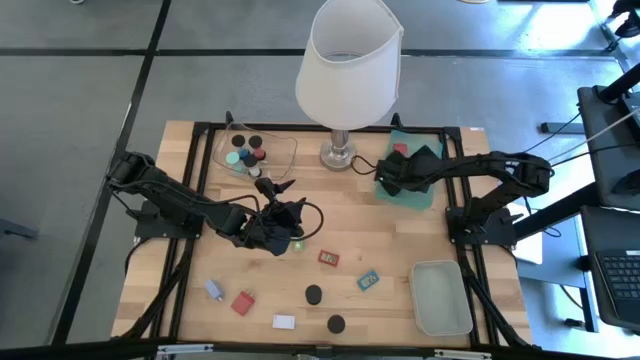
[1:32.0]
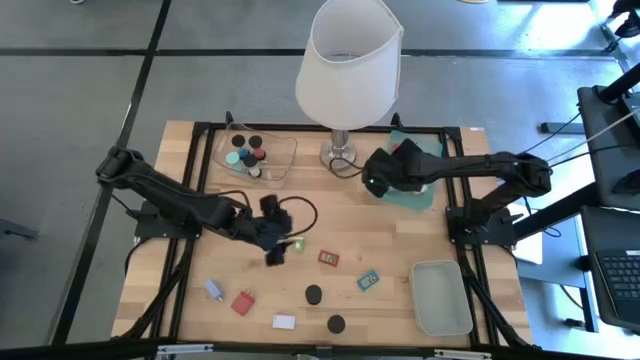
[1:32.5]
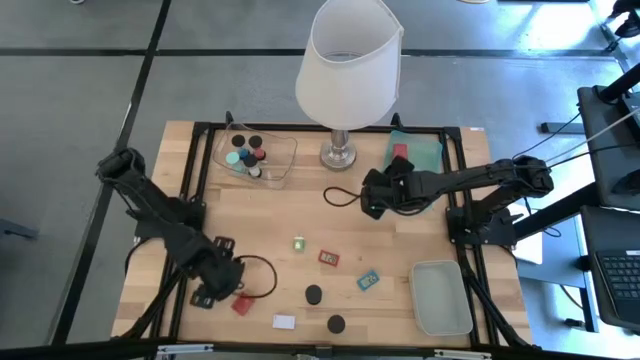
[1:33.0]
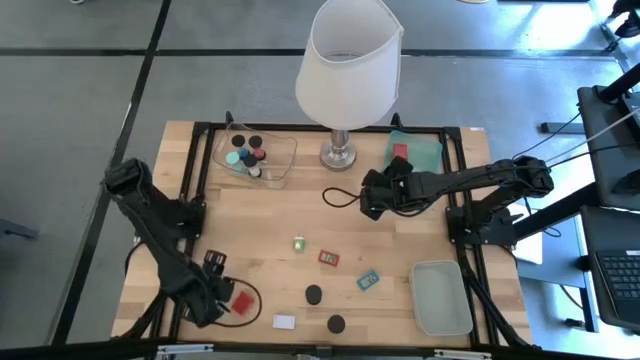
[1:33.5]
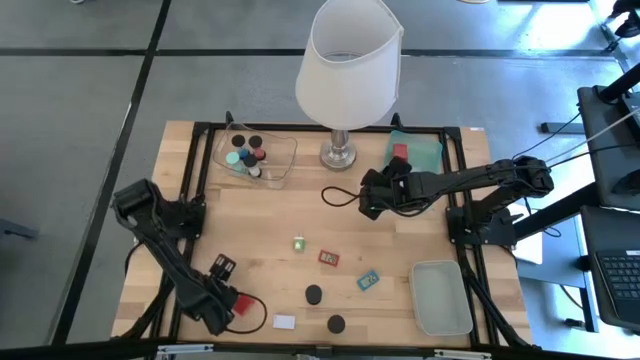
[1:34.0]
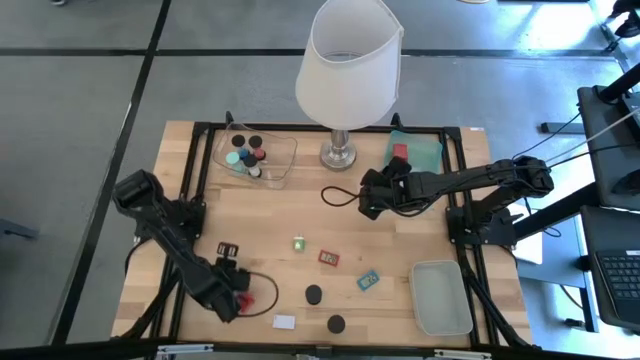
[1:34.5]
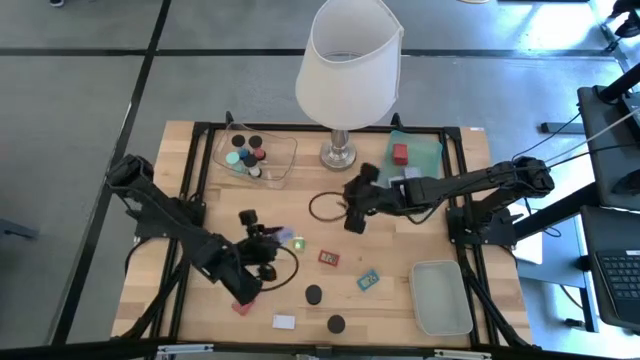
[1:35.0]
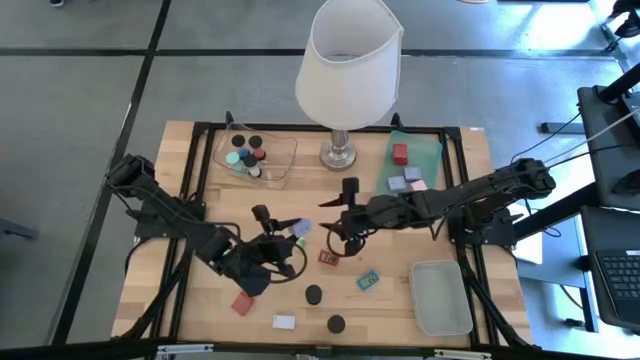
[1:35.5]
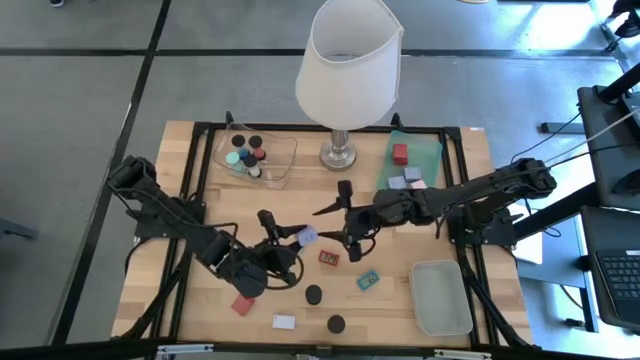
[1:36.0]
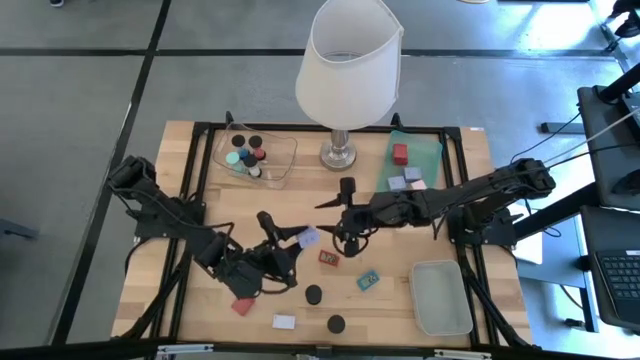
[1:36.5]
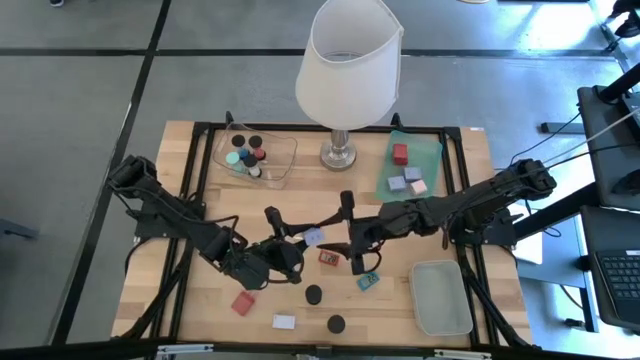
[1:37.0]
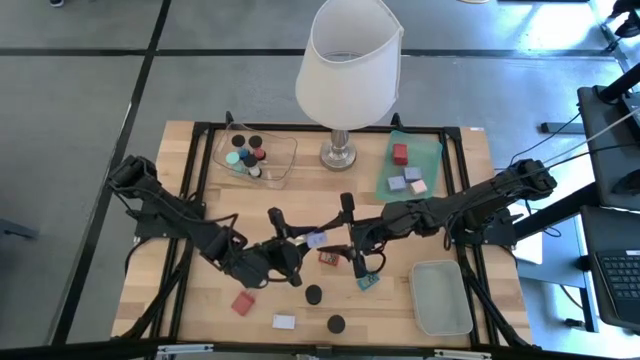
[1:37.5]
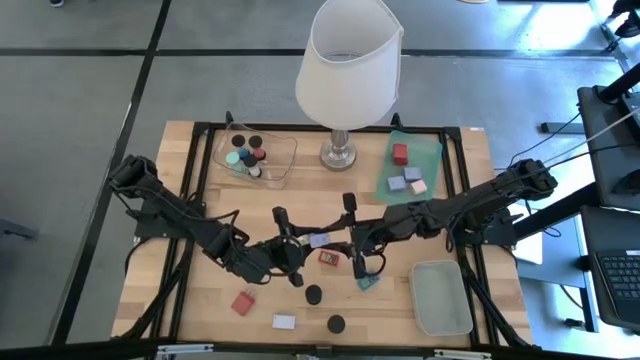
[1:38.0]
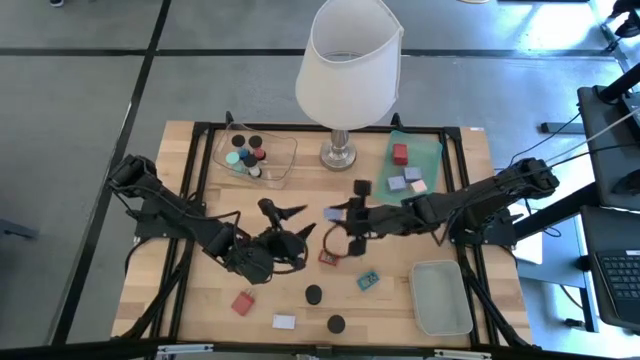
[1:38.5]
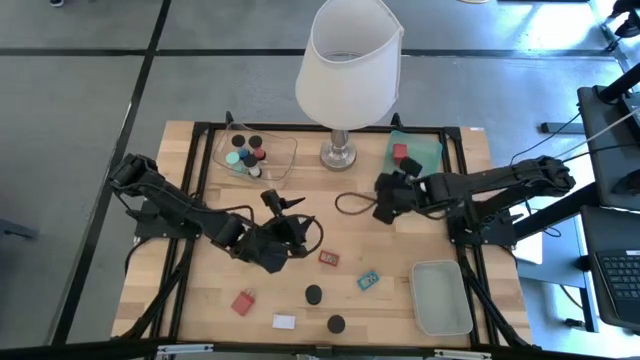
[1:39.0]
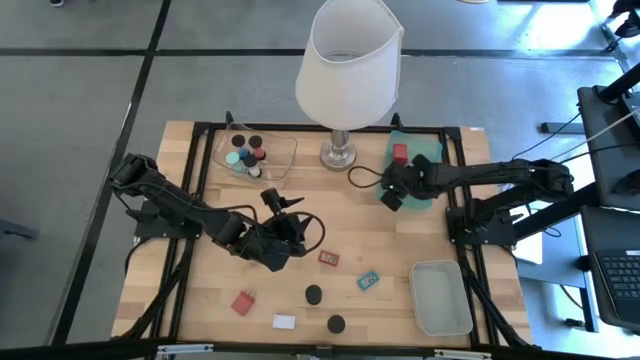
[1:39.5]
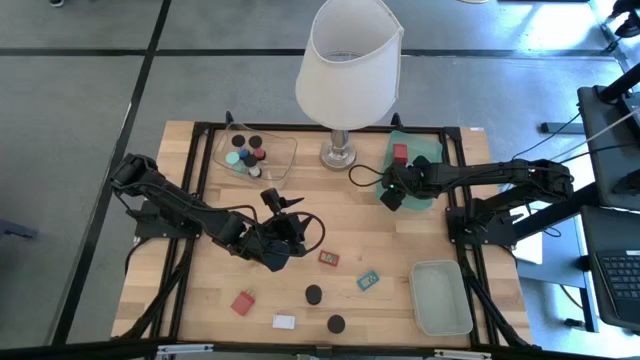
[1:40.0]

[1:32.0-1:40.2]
Task: Pick & Place Office items
Put the purple charger adapter into the green bin

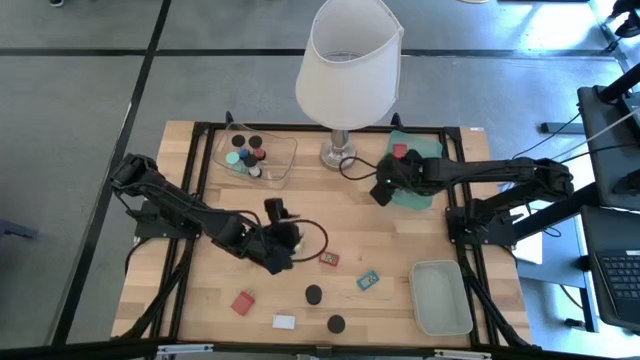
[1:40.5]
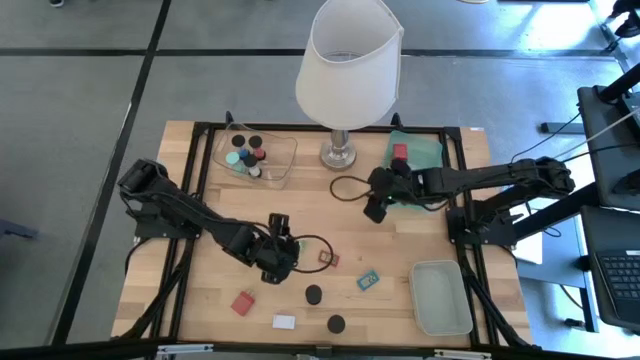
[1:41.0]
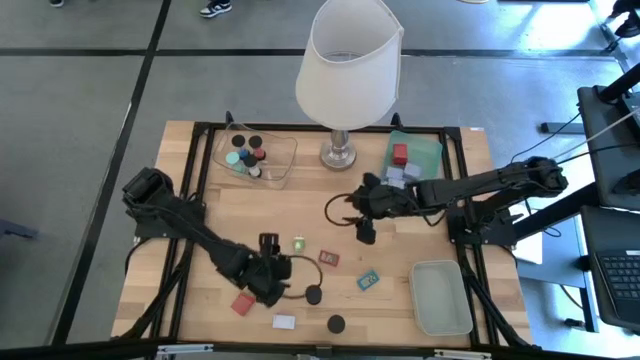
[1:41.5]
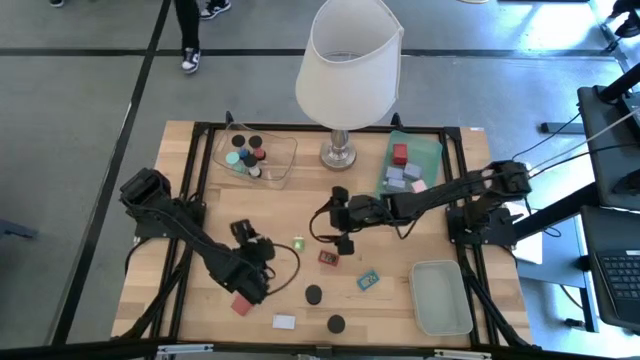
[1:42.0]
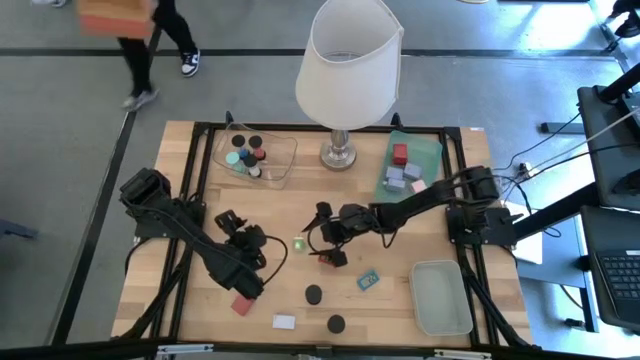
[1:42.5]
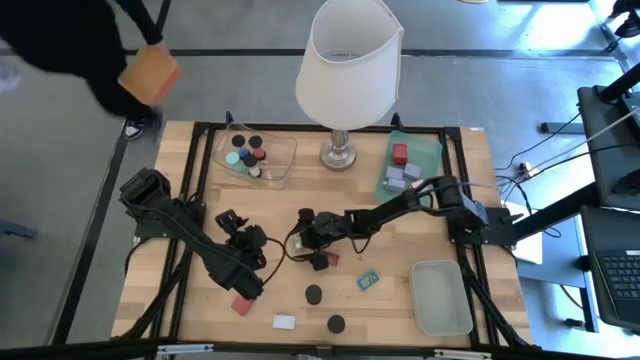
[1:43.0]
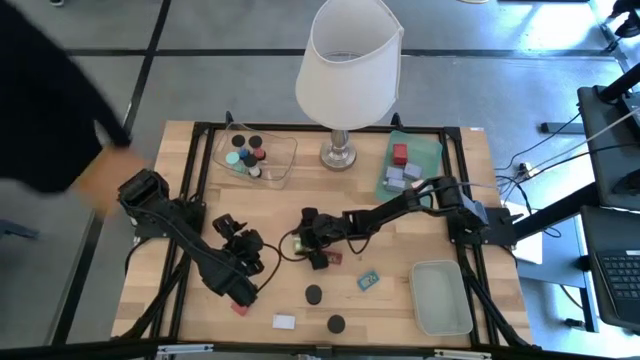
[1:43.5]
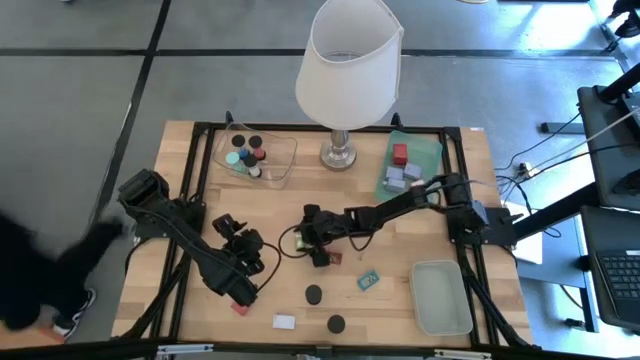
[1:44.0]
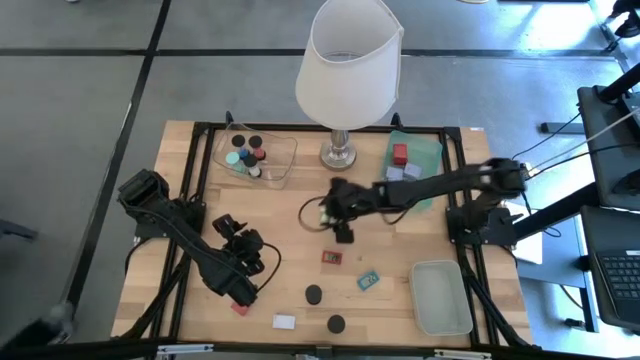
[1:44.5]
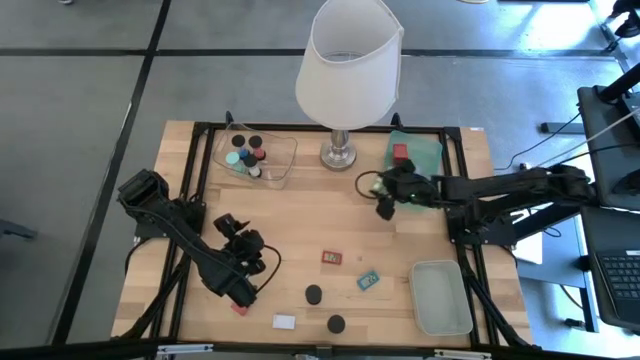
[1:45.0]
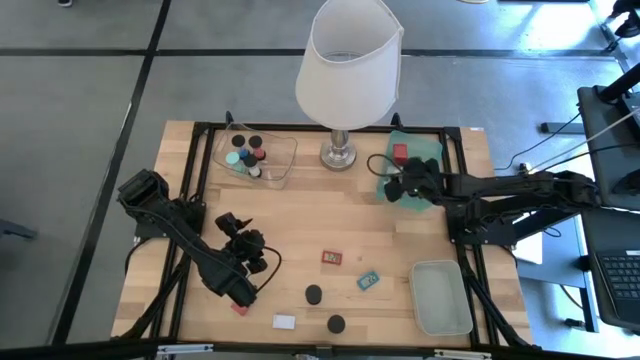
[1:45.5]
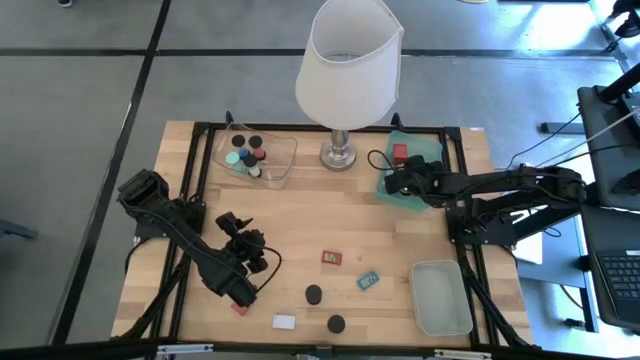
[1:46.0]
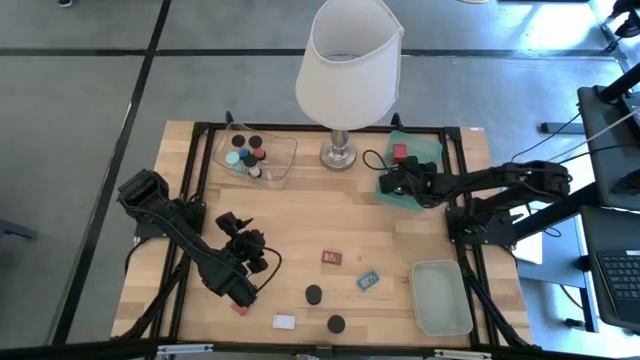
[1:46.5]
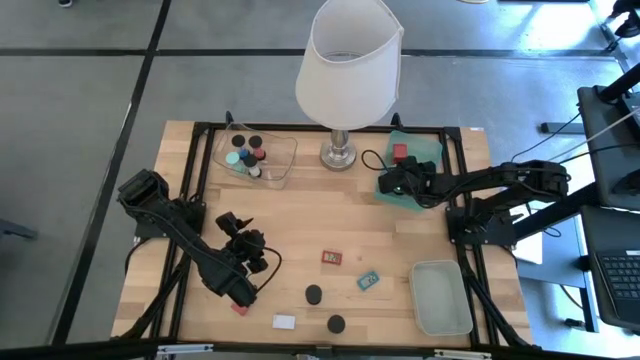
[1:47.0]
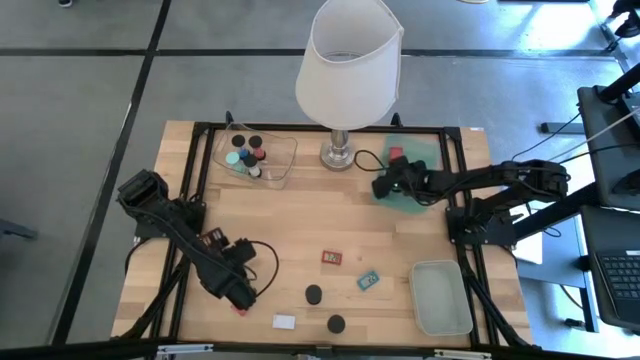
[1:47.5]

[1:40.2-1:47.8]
Put the green charger adapter into the green bin

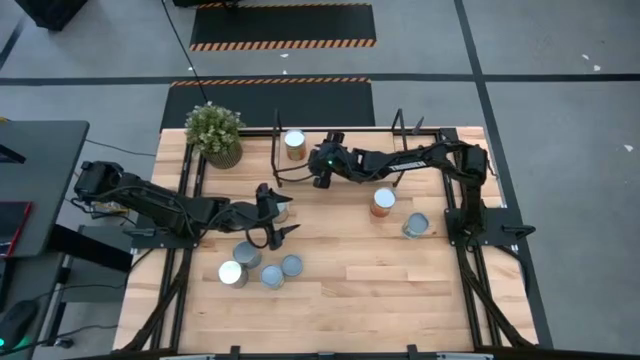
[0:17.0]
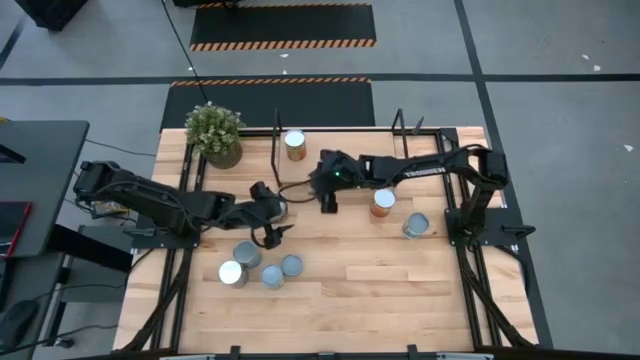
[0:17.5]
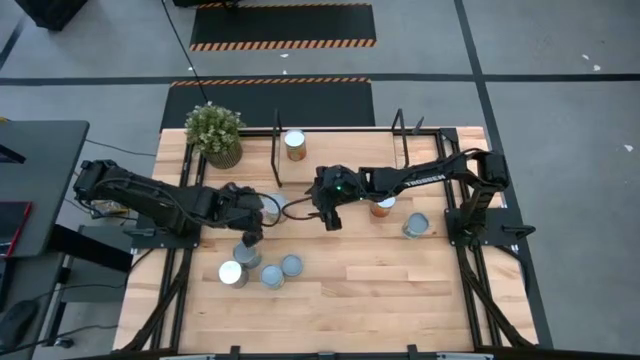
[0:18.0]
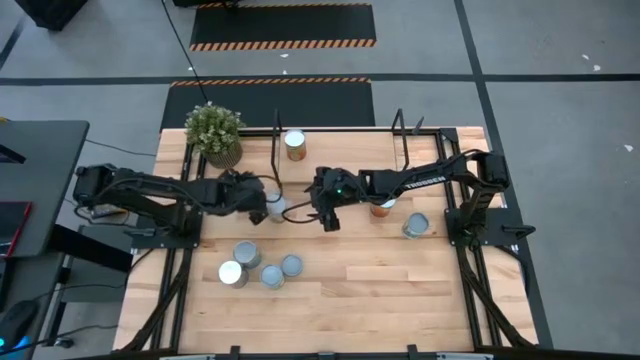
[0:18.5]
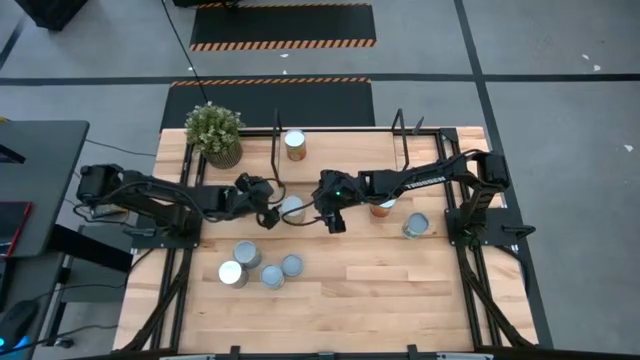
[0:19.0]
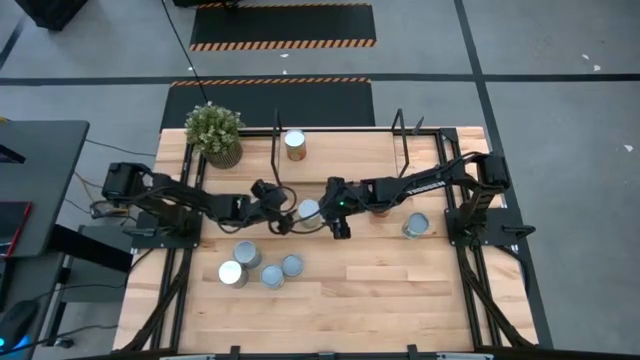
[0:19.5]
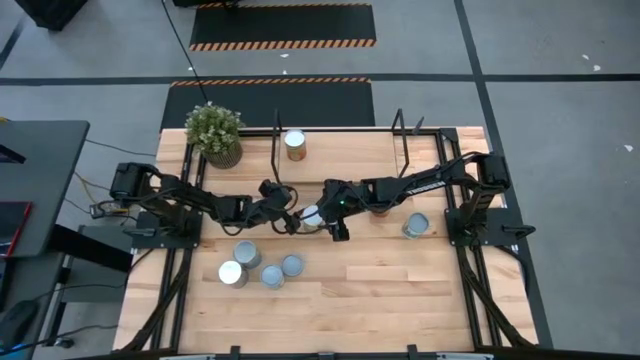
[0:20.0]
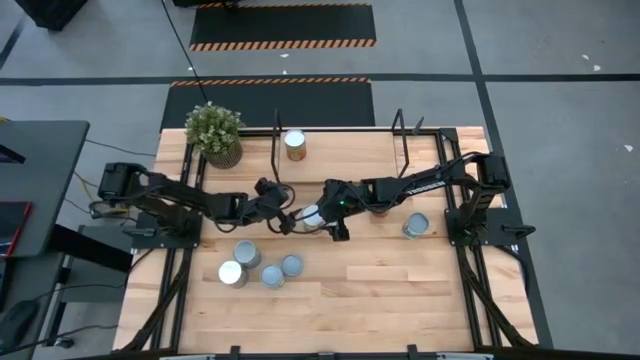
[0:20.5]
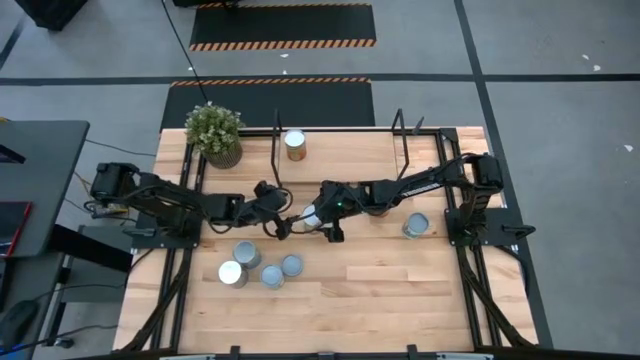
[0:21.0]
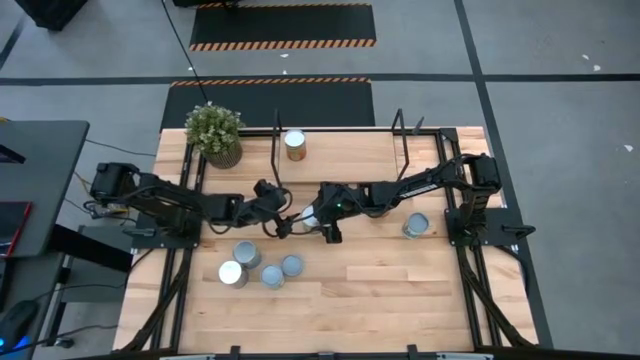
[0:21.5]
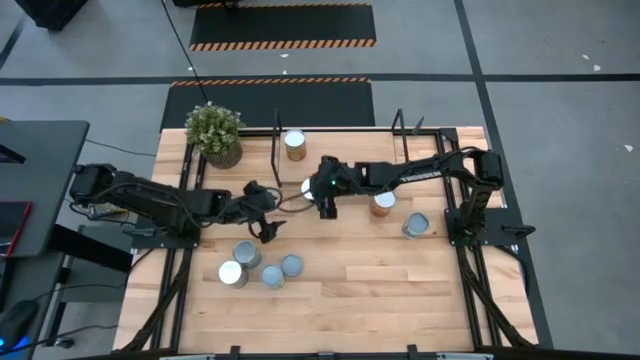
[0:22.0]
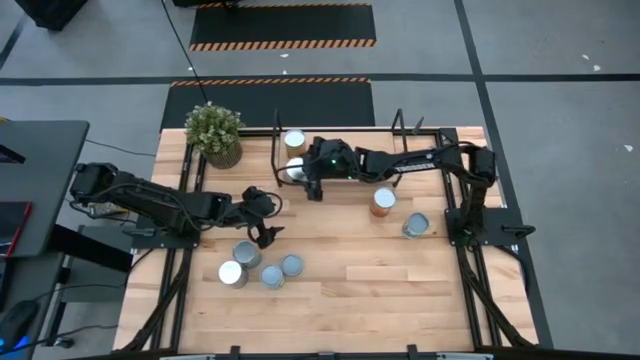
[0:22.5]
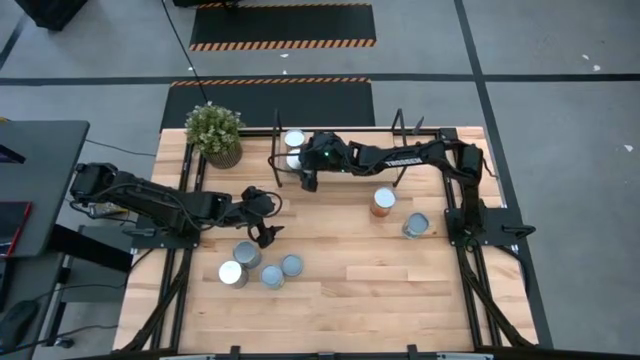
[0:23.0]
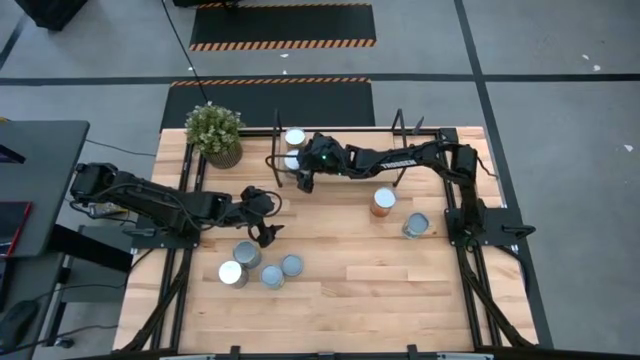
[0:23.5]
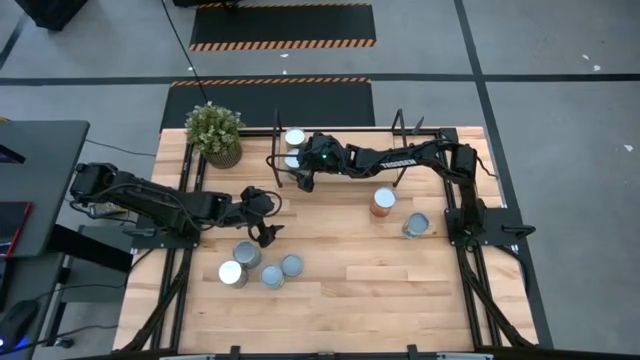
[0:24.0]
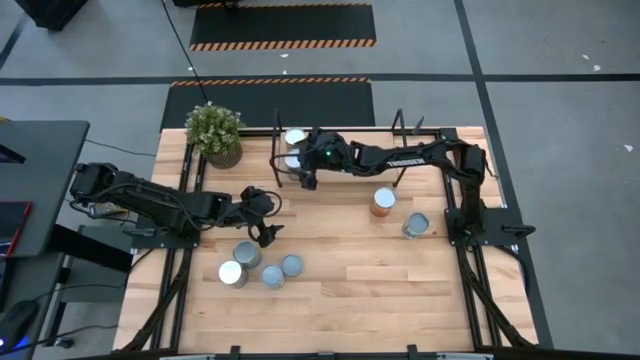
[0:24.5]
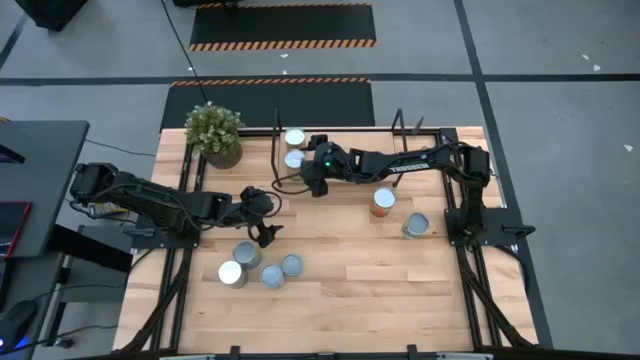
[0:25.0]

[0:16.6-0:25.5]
Task: Pick and place cans onto a shelf
Put the canned oranges on the shelf
